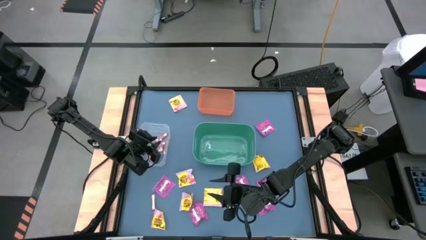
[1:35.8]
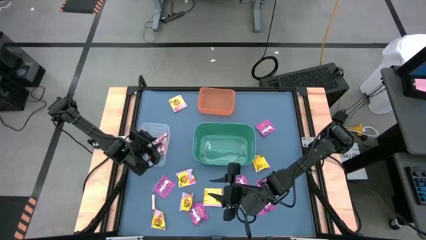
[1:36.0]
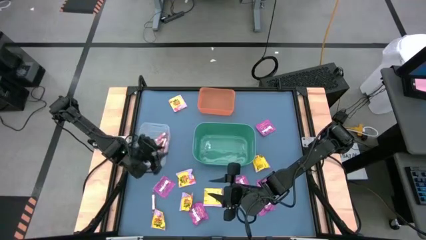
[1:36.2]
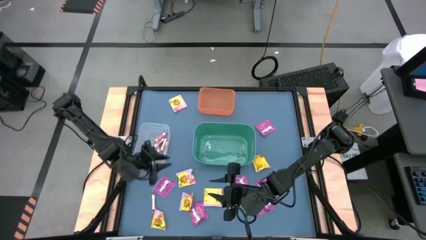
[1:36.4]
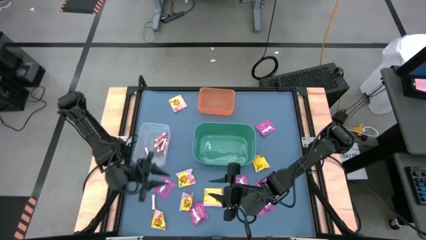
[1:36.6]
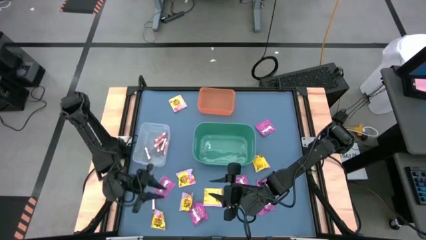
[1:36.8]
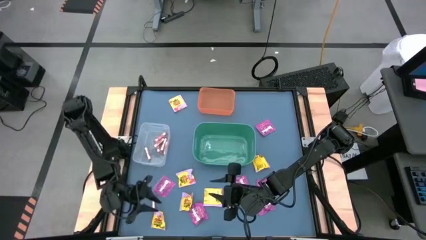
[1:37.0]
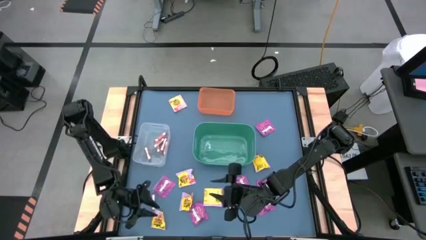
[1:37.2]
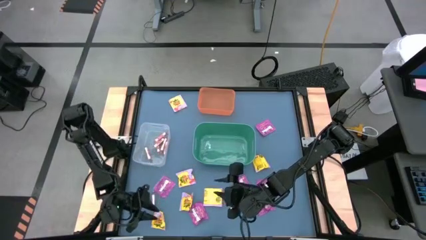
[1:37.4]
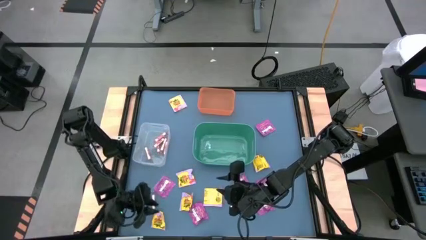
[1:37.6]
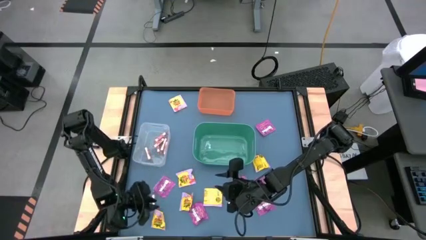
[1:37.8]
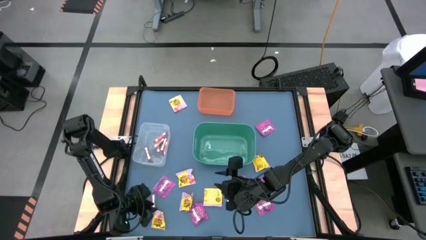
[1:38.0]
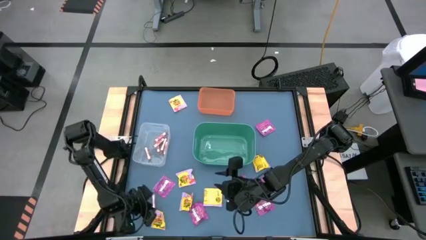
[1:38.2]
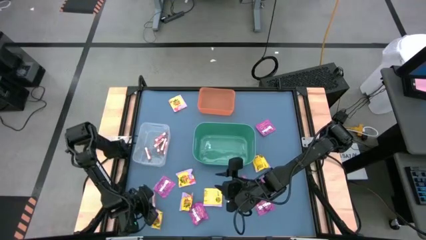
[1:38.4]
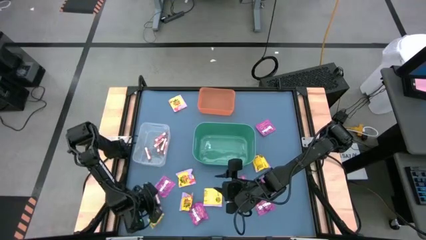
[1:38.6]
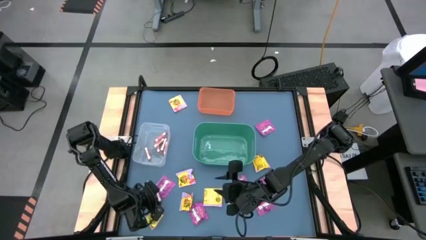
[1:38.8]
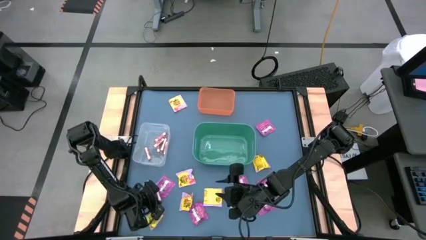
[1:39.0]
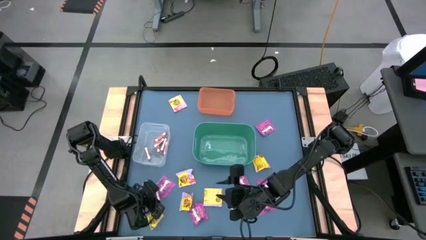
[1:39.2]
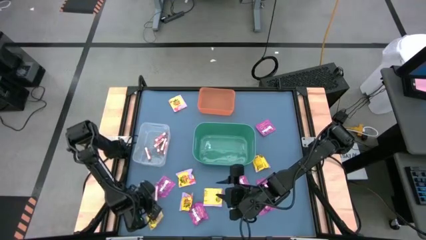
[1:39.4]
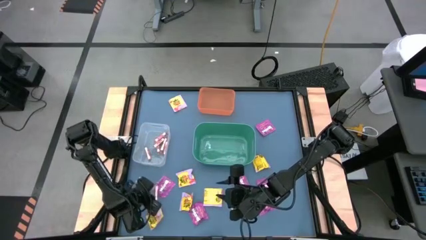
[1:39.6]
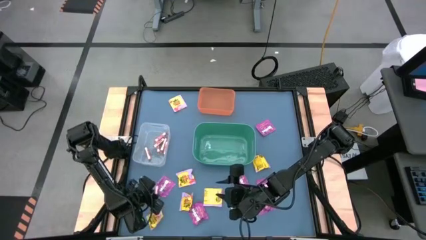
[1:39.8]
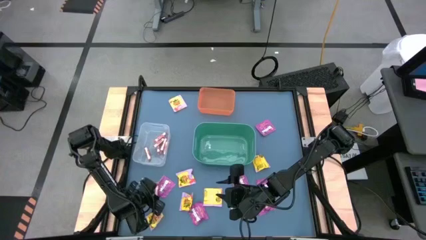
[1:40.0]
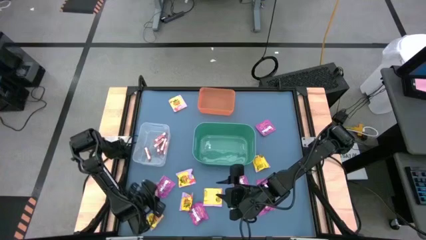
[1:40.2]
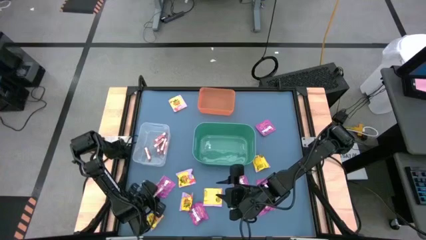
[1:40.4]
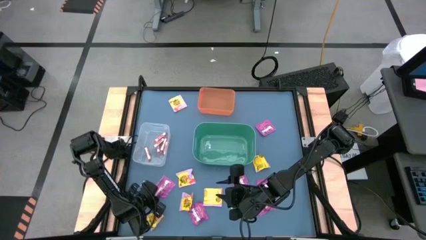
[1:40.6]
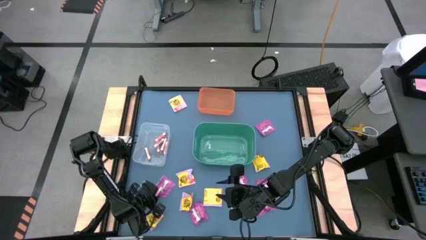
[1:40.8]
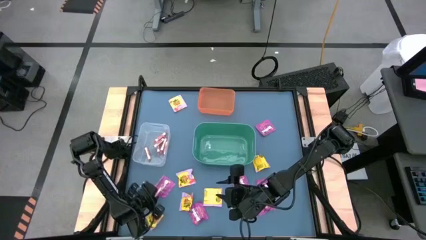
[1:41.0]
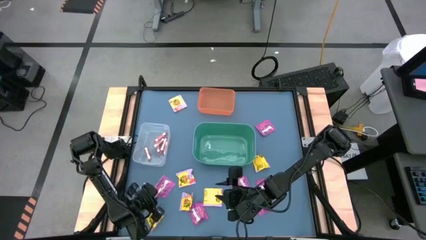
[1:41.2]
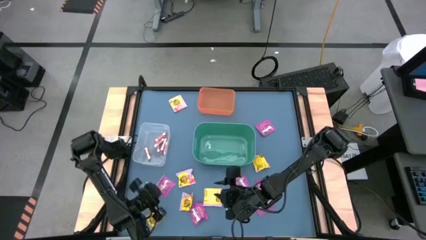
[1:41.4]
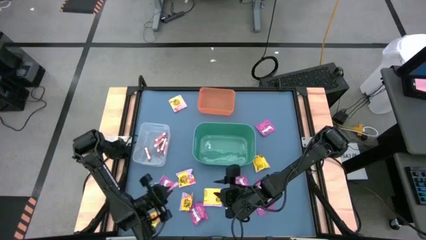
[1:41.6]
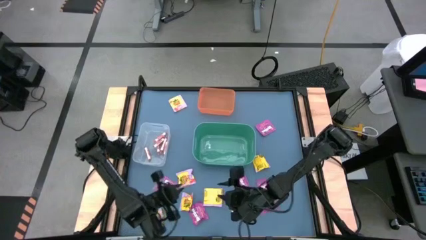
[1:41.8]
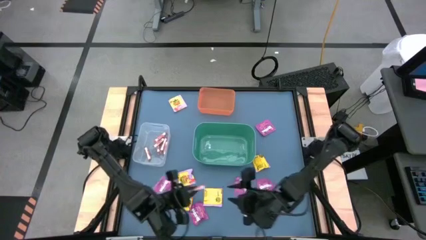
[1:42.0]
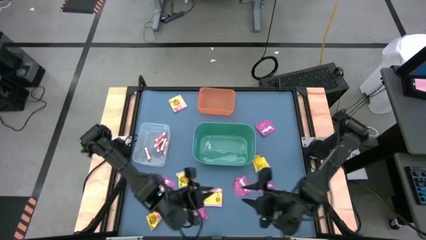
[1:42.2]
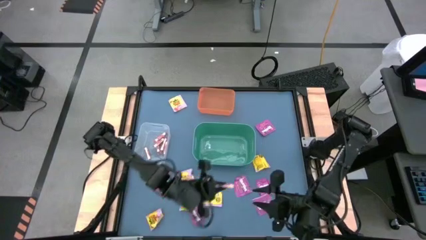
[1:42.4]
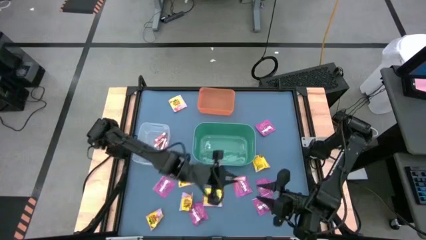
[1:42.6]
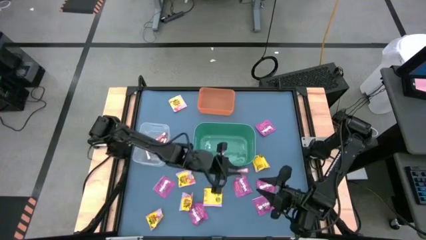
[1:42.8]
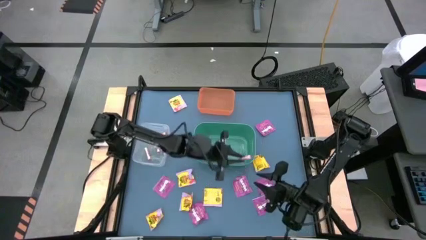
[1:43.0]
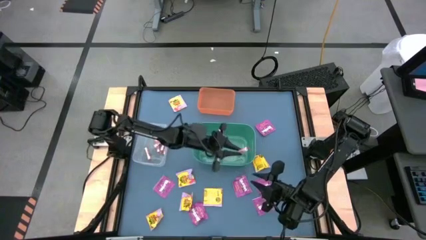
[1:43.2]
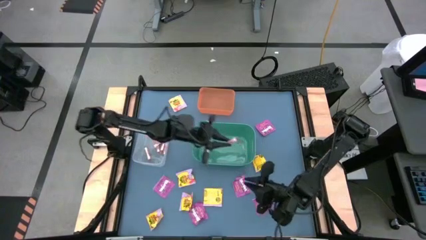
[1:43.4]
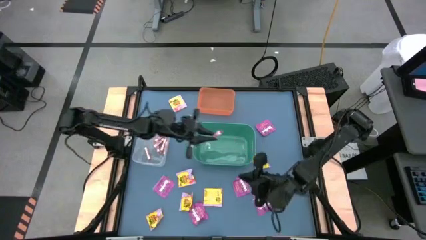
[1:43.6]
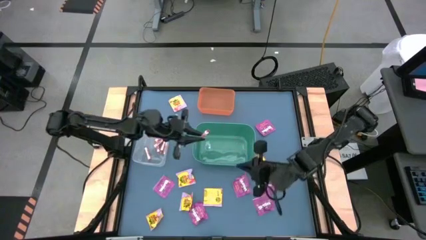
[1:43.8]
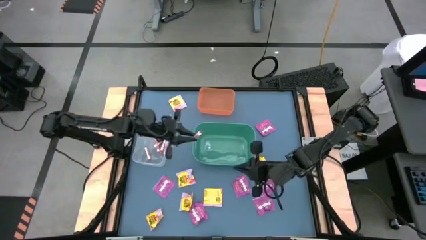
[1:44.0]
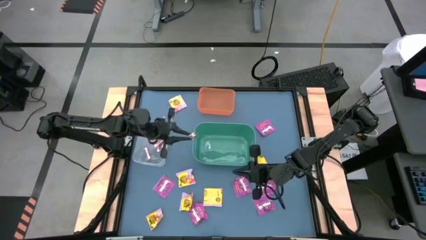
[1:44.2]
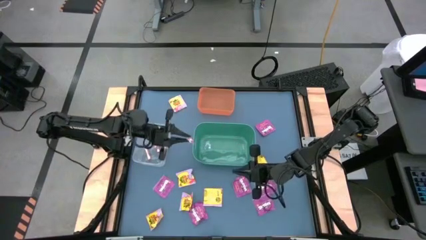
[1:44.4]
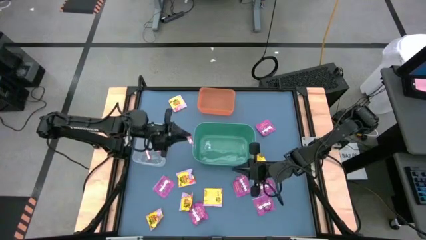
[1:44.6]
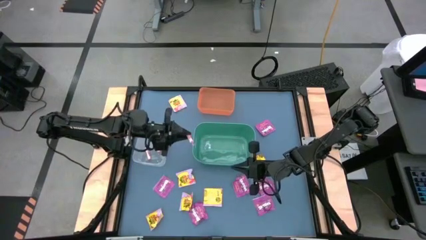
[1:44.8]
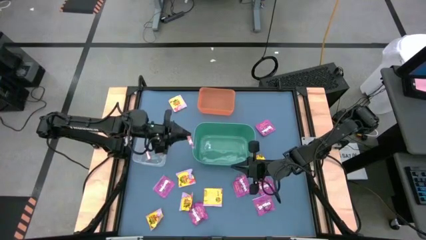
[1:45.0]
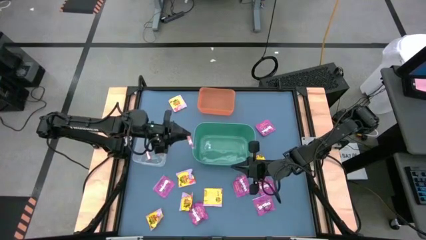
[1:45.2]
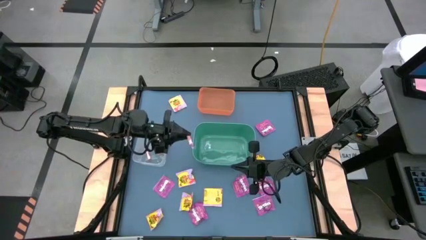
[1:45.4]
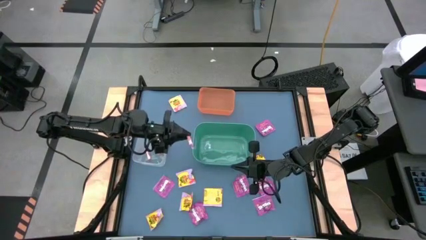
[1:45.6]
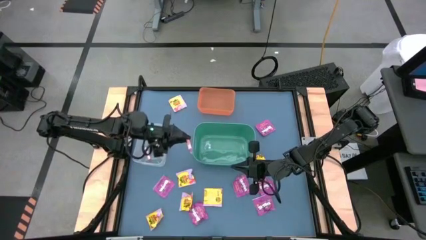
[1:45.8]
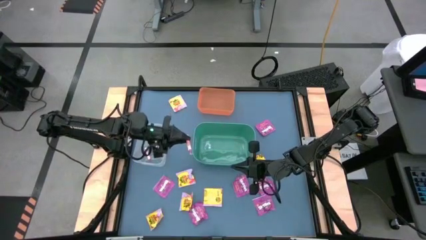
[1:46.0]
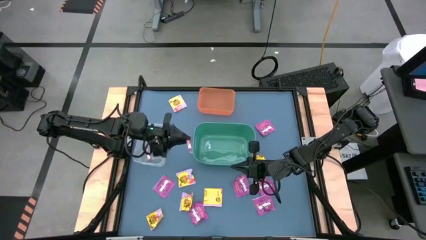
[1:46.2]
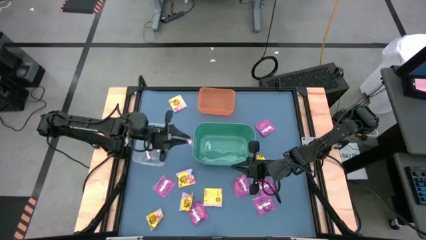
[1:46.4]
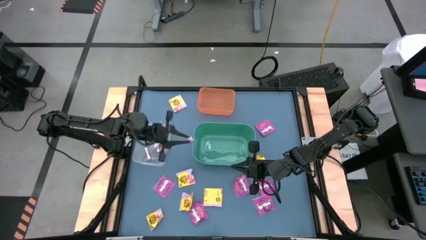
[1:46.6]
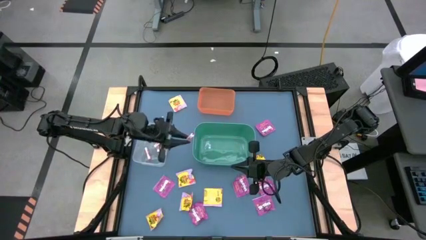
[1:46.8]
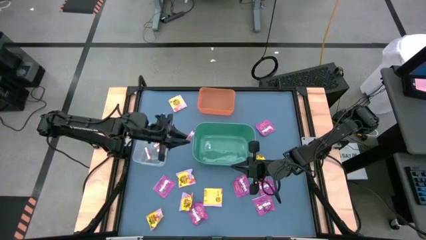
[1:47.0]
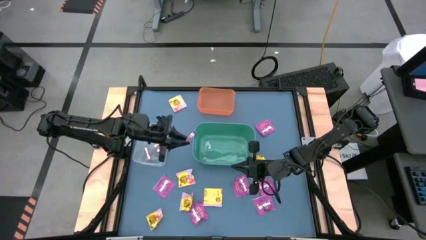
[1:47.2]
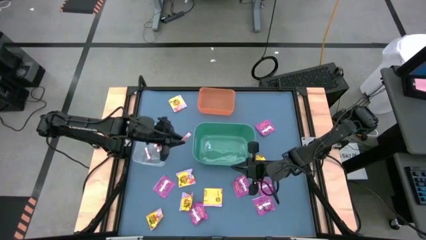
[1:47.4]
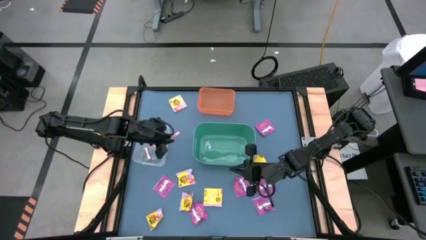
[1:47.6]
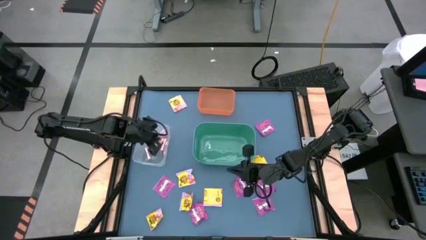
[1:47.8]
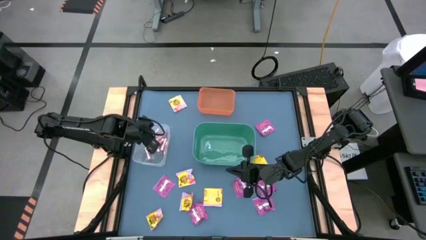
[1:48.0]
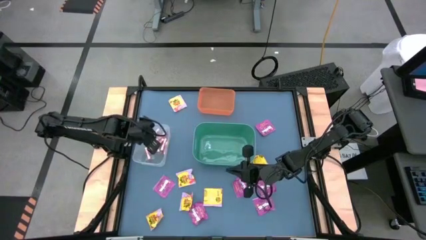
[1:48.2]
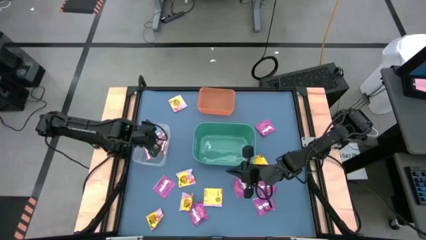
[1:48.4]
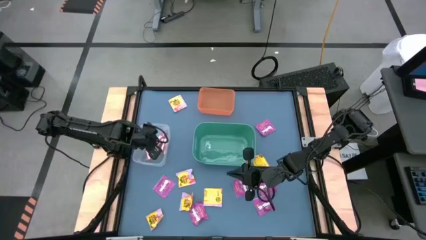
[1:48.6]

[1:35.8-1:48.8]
Task: Sort candy
Put the orange candy into the transparent bin

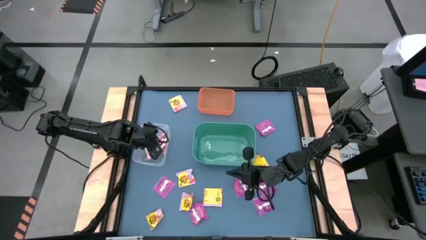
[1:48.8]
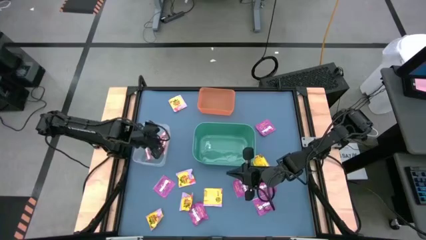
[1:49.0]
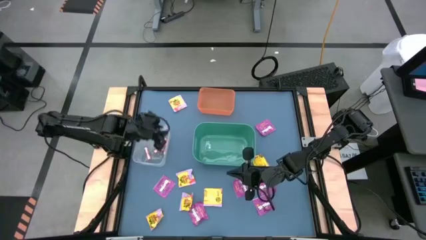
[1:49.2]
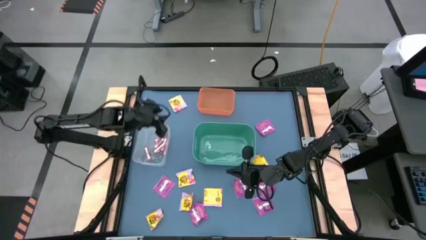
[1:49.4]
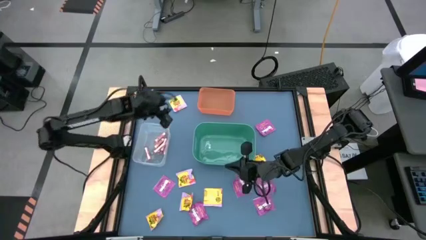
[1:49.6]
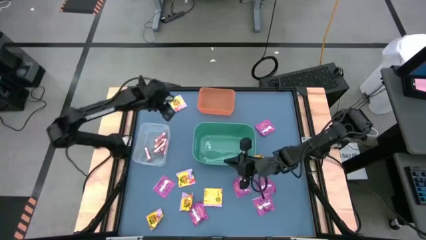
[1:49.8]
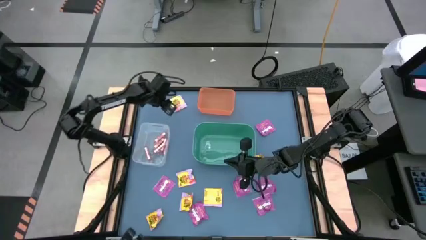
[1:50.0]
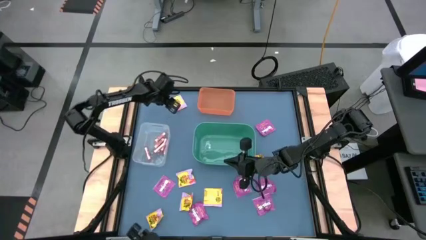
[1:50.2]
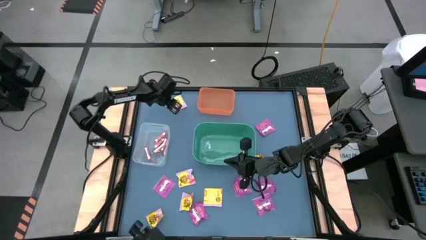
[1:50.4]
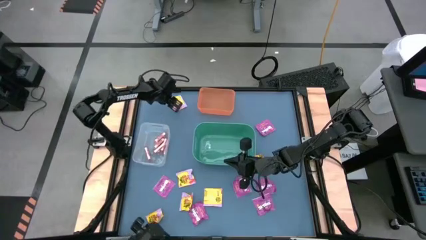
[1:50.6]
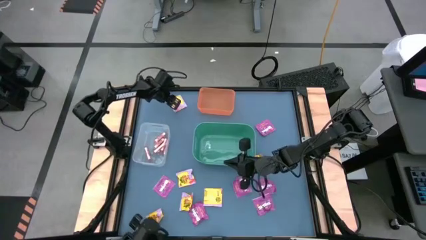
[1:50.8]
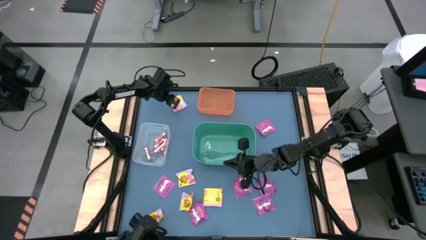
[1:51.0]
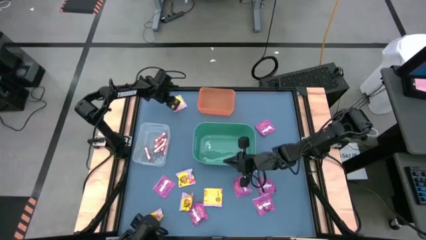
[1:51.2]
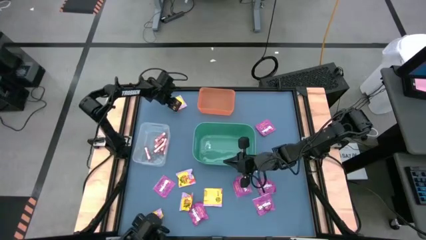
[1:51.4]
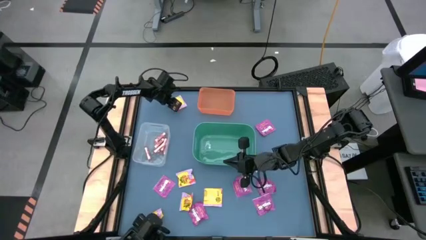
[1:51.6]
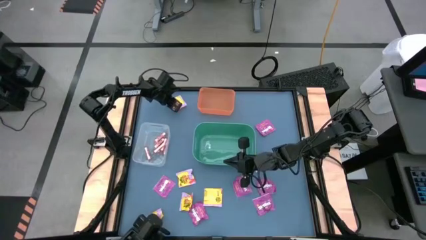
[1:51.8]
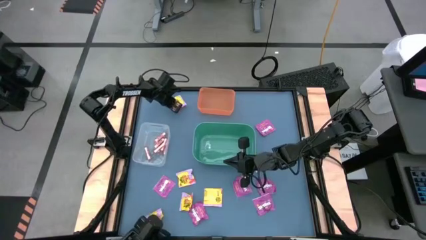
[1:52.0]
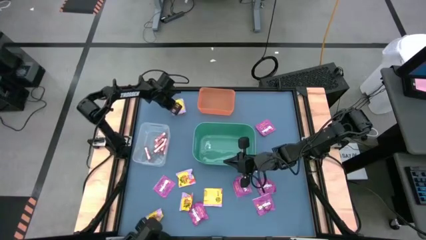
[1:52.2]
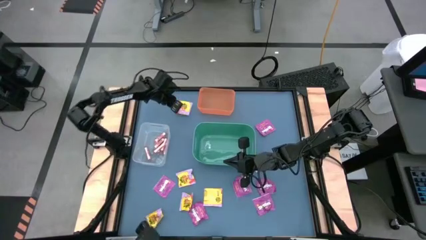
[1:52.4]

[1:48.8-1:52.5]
Put the yellow candy into the orange bin
